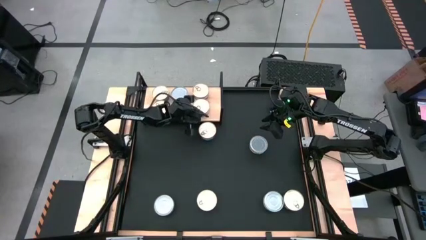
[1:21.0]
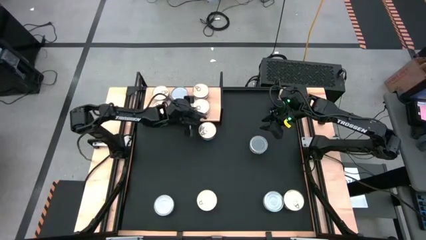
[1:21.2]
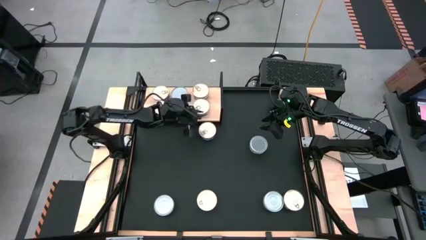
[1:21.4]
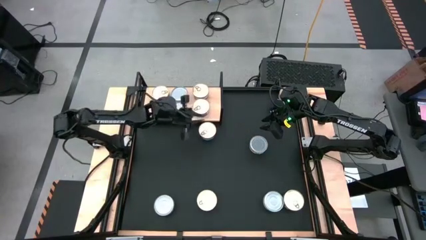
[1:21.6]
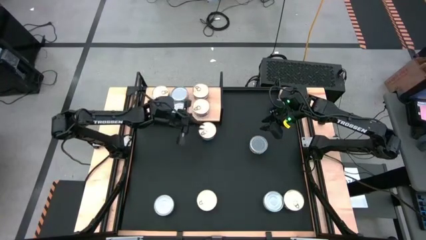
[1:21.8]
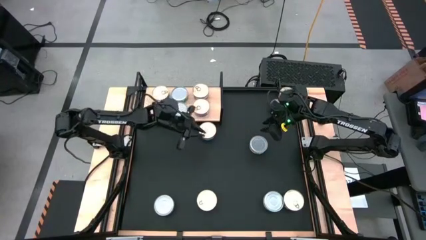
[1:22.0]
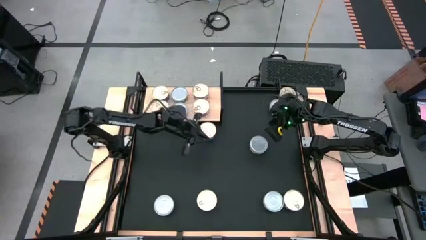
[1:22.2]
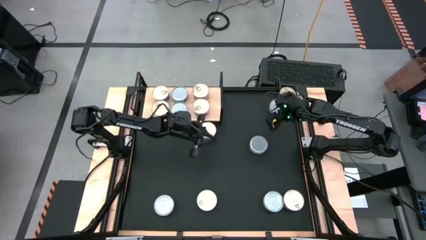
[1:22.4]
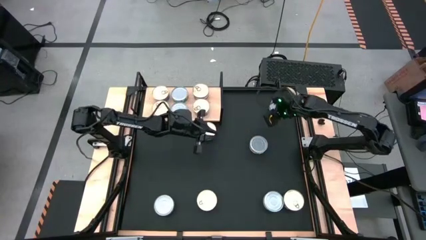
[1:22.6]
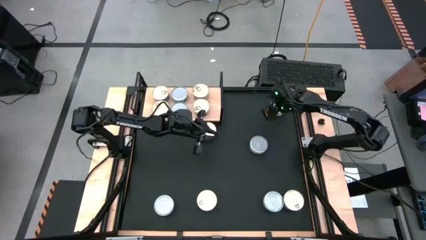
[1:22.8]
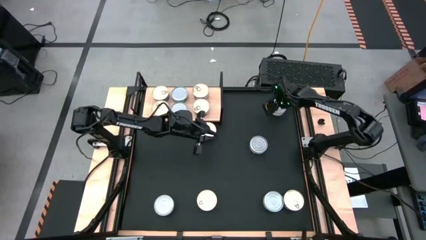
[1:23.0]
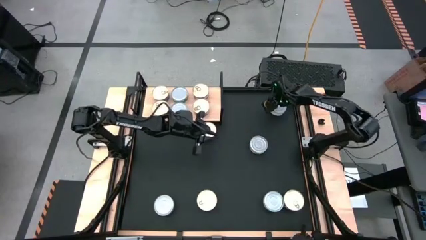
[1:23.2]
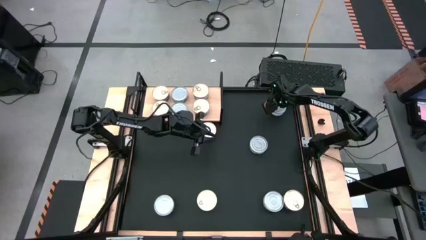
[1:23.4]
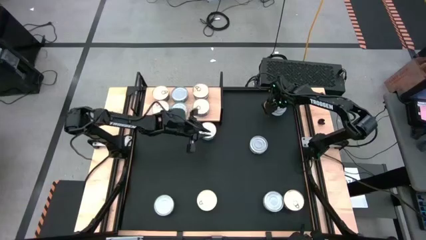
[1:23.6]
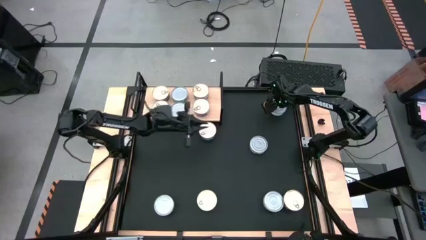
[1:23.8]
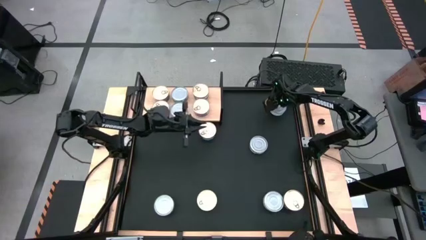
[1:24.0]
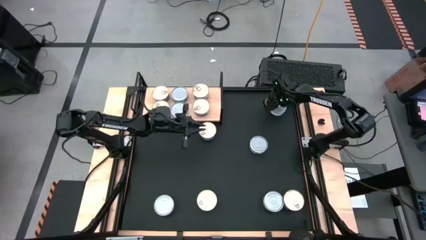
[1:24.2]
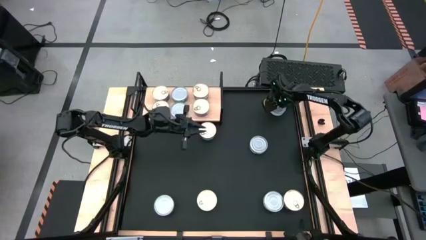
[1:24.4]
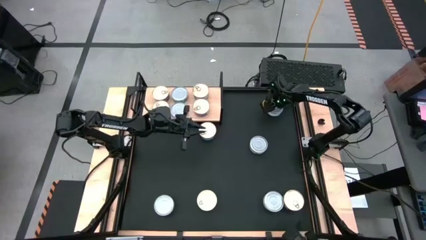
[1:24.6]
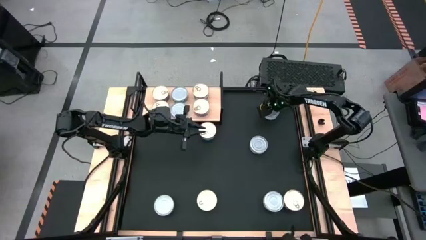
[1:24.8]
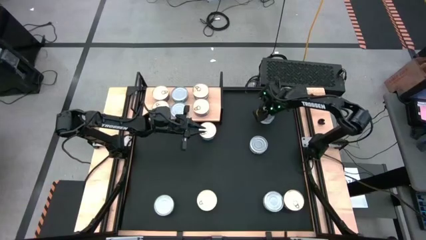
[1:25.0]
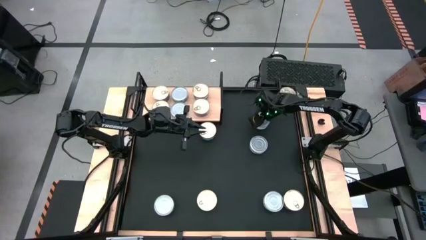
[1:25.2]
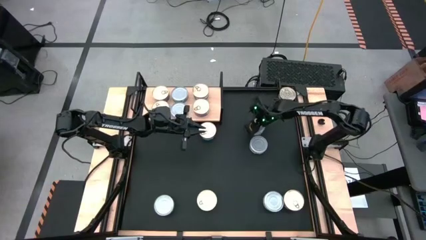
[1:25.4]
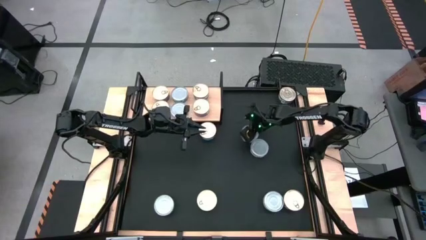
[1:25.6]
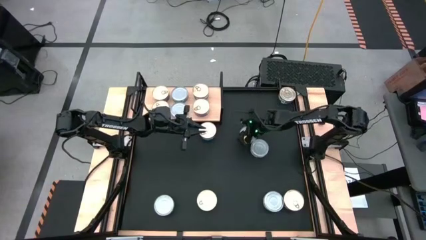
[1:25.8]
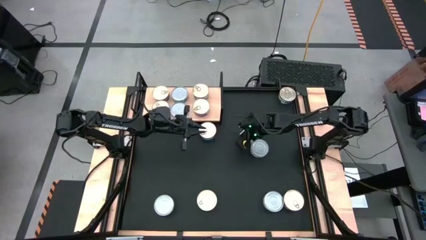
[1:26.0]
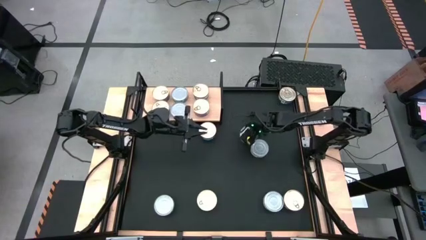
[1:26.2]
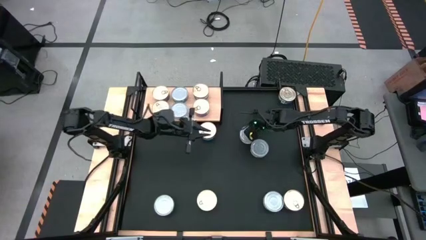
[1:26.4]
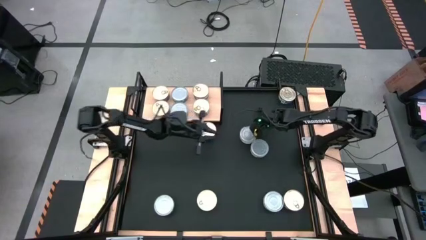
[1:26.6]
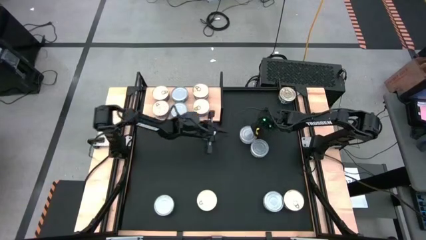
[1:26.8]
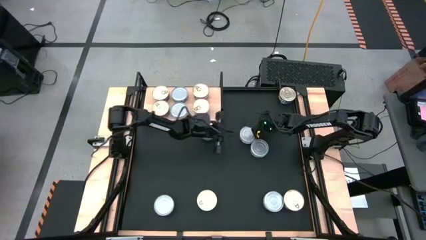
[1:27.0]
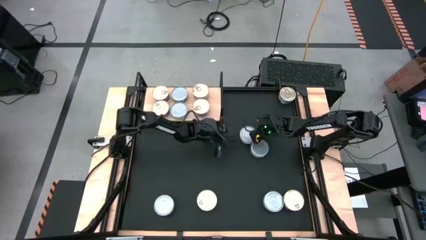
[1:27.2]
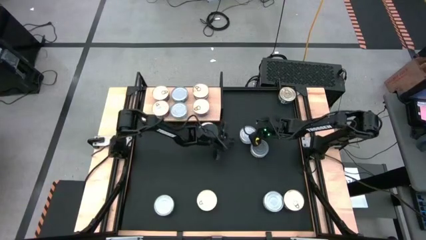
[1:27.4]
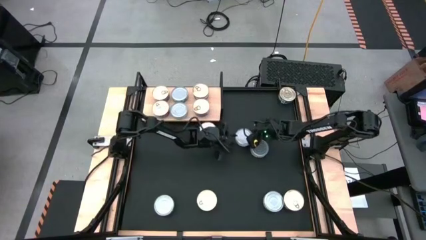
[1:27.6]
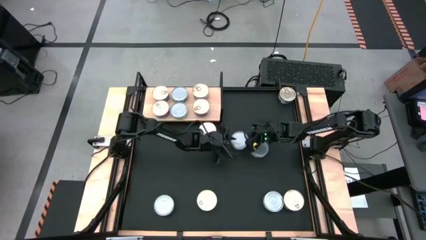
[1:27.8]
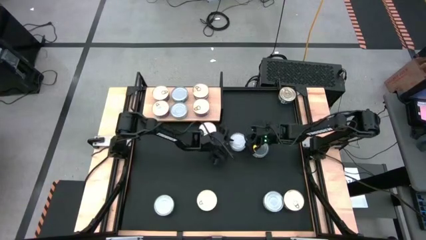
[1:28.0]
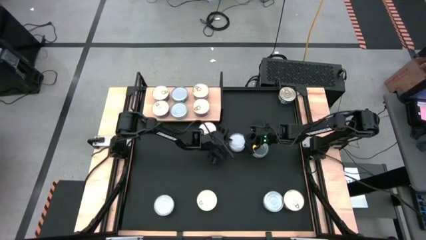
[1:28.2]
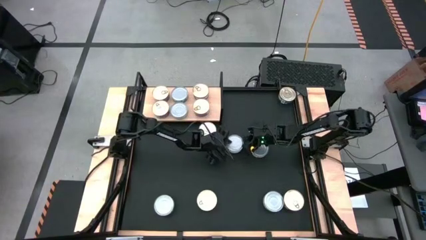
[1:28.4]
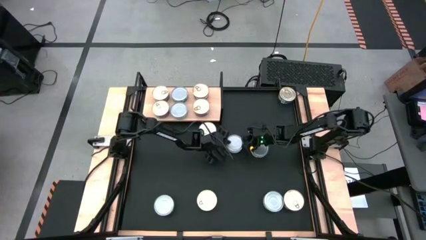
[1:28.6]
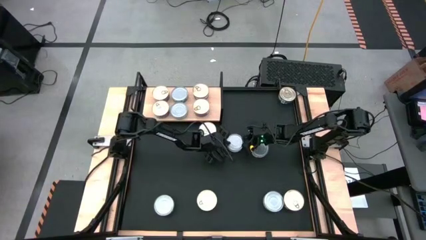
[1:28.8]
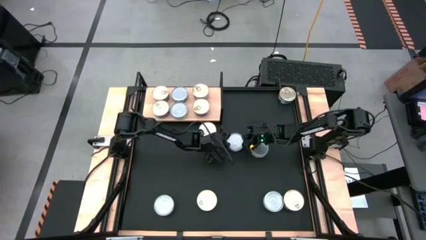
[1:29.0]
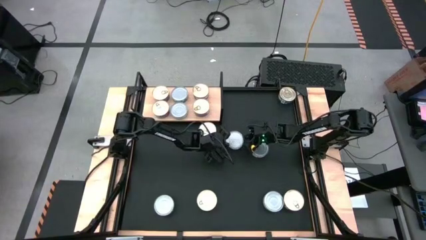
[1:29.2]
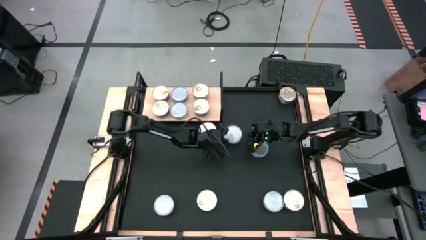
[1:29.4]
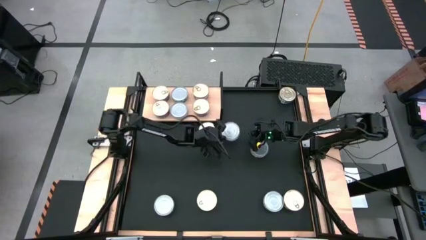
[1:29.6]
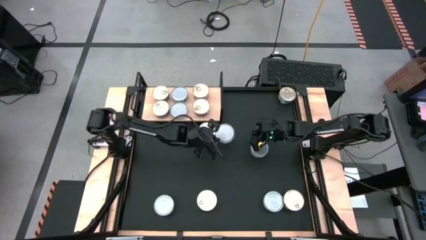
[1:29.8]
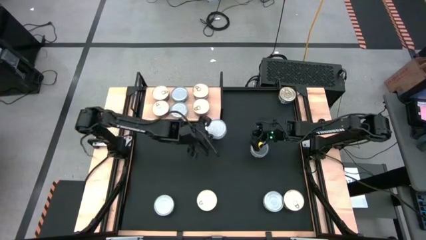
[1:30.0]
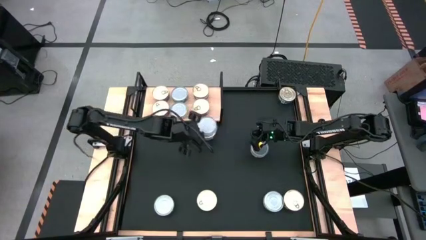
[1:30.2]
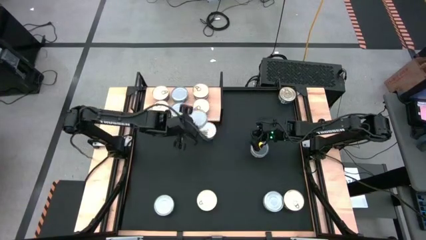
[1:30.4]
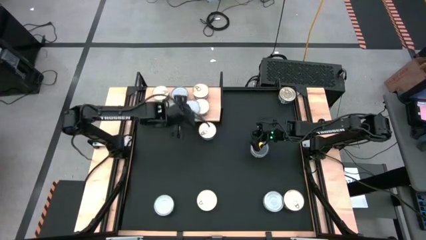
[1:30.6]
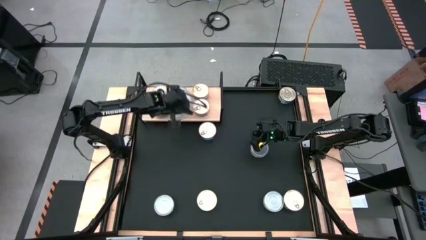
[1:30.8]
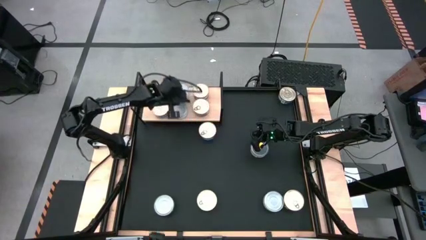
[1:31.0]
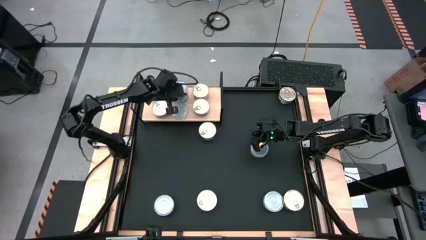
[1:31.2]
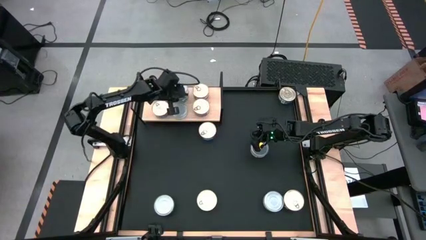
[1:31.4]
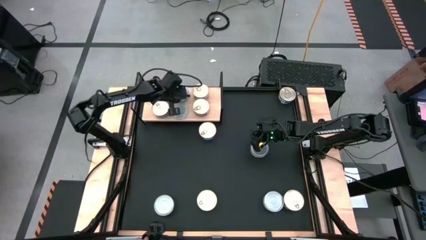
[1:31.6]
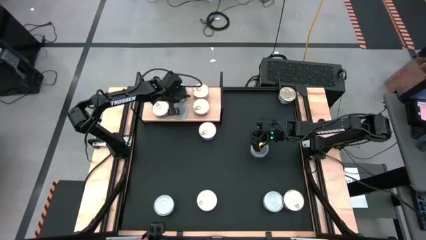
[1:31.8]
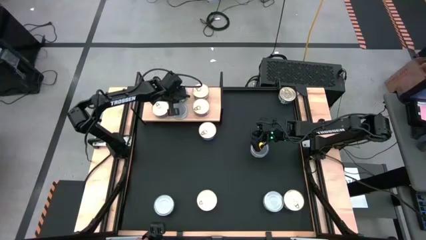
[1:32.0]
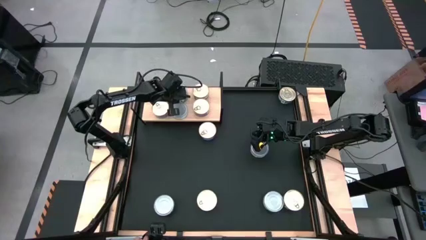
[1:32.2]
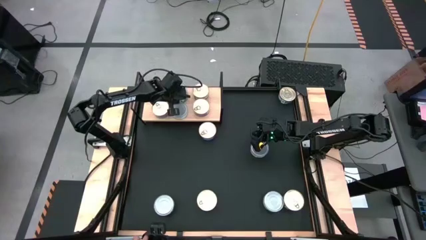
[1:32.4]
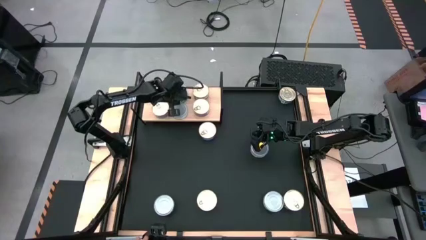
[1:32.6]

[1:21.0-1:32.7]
Task: Stack canned seafood by type on shelf
Stack the green tuna can on top of the green tuna on the shelf

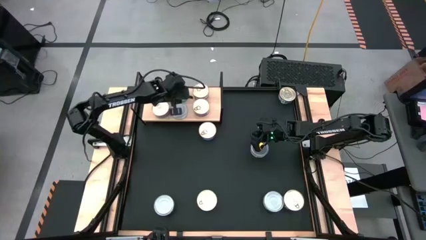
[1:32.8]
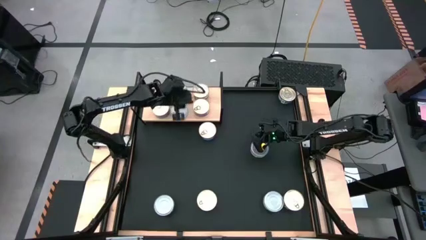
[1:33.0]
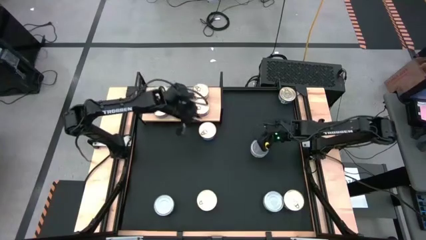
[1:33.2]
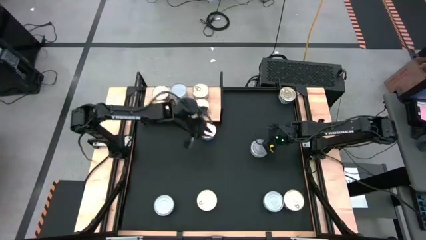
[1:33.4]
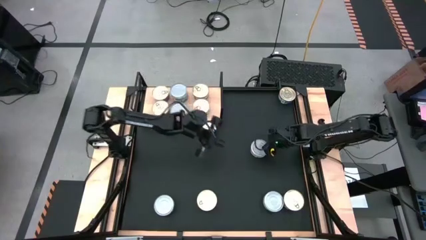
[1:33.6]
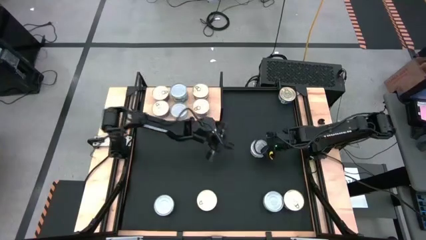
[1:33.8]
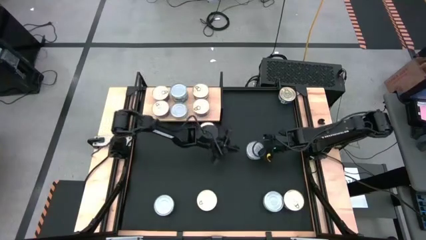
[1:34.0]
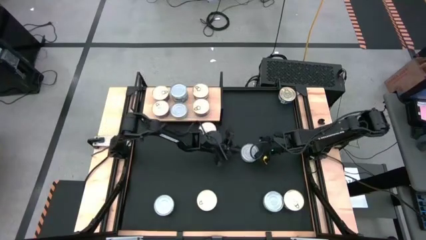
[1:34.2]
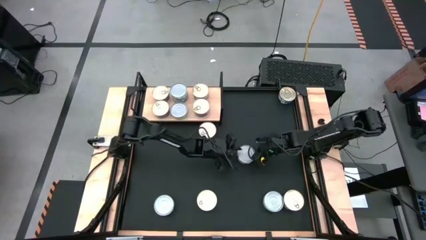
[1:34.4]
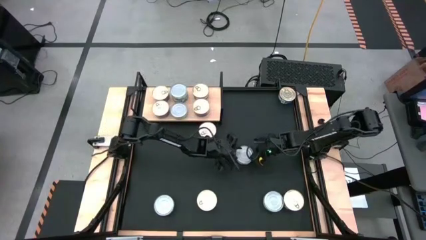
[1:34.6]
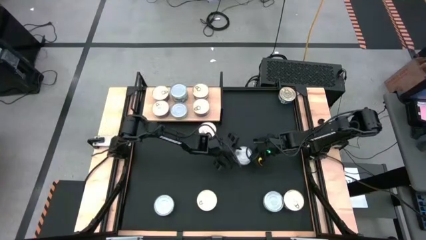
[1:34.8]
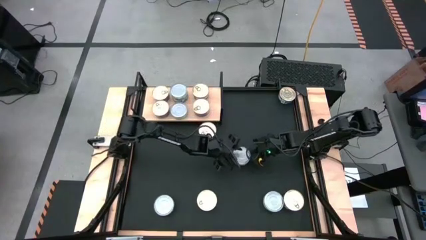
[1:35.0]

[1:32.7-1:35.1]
Adjust the green tuna can

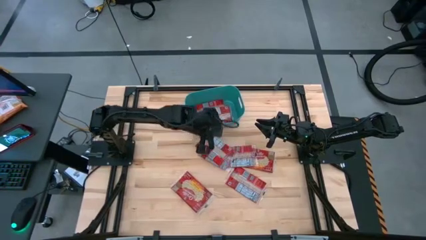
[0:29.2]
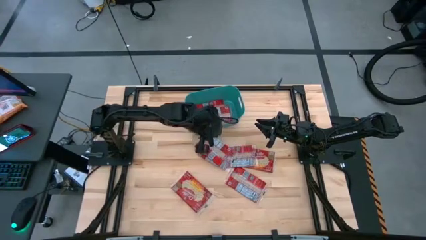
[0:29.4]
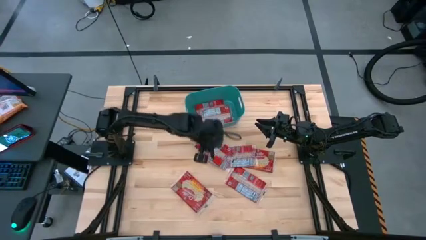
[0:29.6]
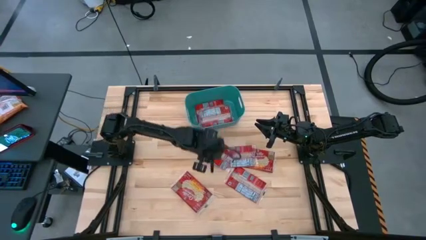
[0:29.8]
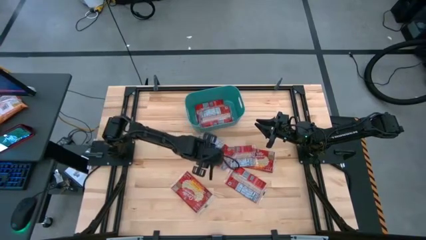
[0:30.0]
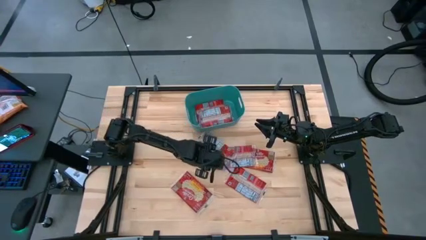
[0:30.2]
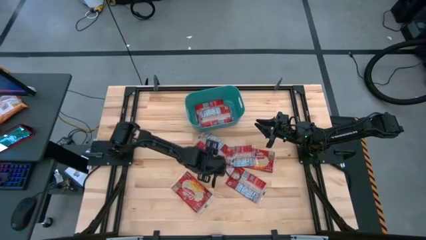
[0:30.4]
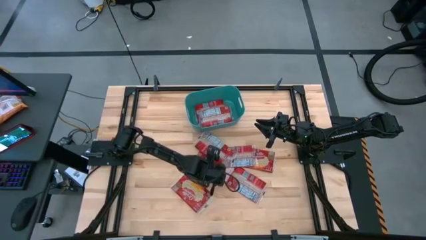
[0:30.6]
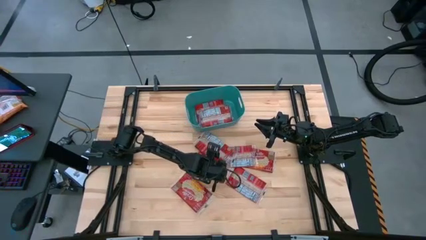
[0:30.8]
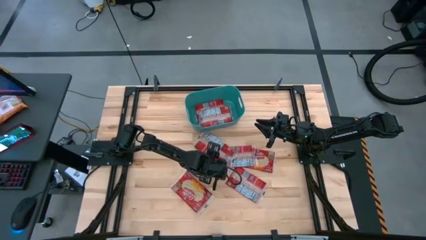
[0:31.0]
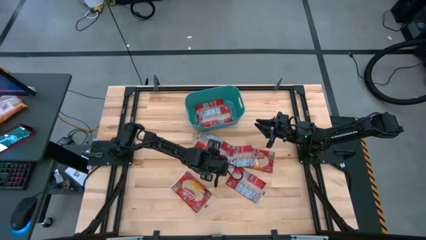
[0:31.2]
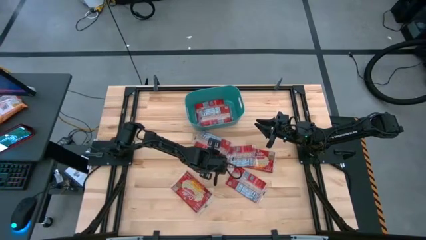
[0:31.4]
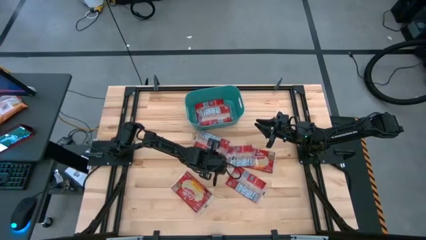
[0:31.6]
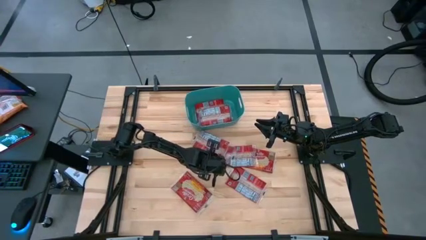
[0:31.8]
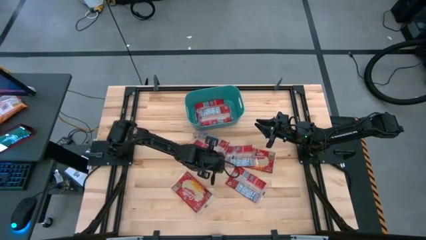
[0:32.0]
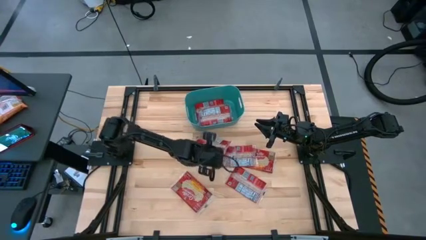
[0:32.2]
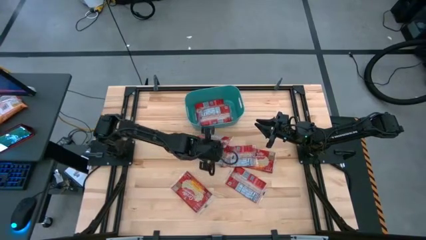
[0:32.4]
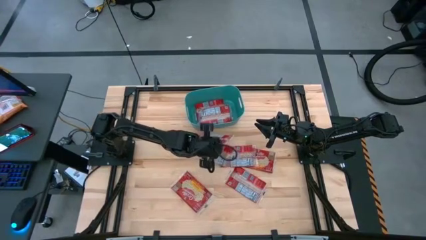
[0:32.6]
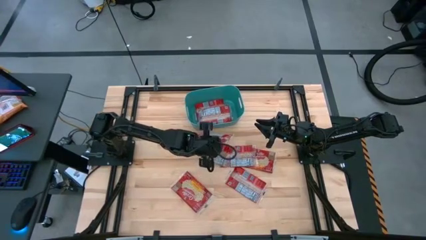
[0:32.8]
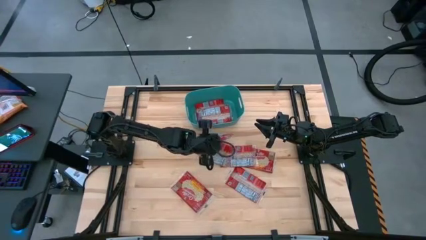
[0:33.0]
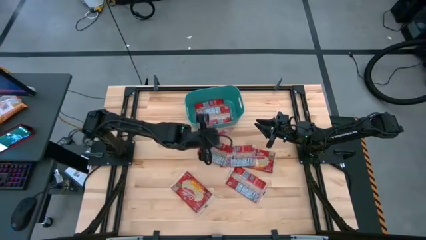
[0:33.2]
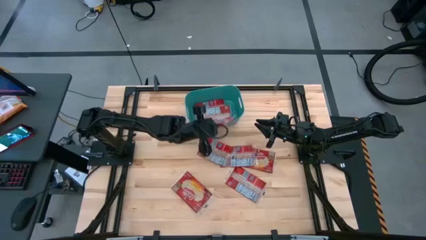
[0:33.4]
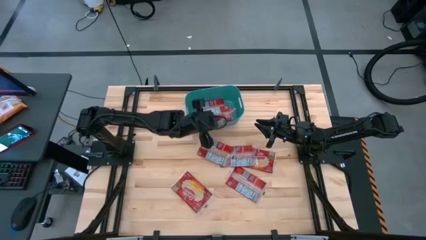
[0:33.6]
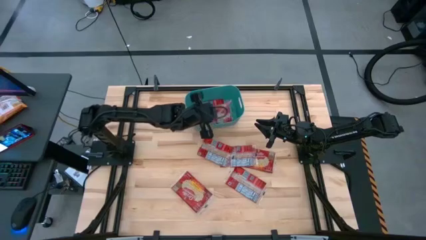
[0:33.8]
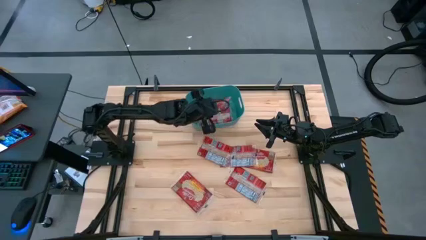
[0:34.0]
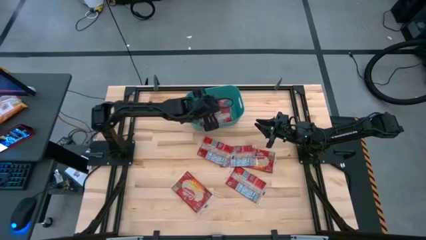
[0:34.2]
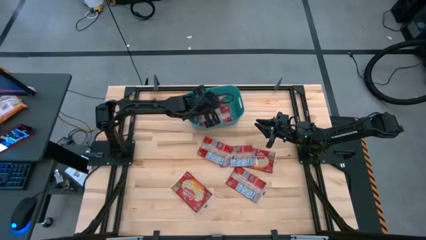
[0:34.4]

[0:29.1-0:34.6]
Task: Sort popcorn bags into baskets
Put the red popcorn bag into the blue bin
